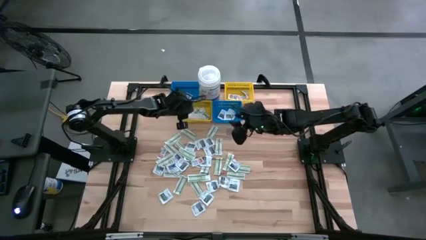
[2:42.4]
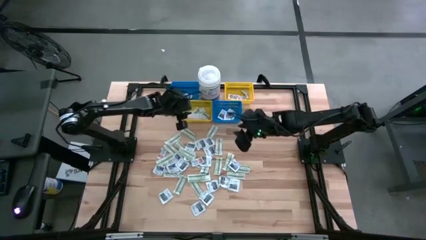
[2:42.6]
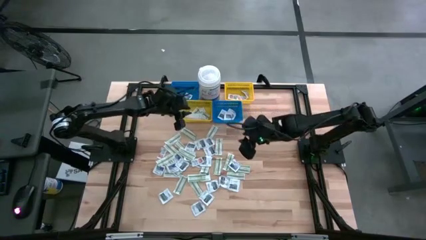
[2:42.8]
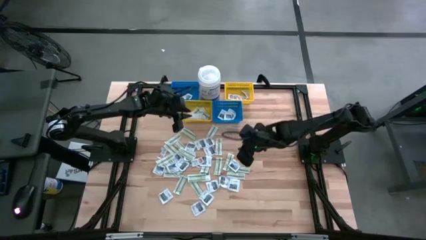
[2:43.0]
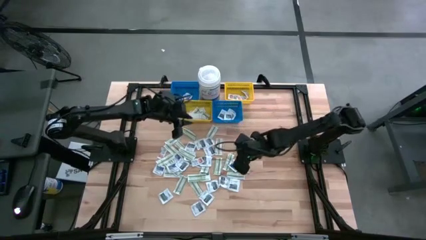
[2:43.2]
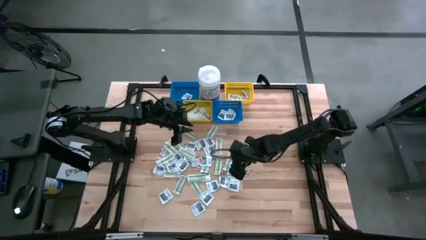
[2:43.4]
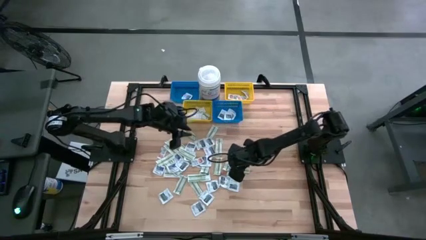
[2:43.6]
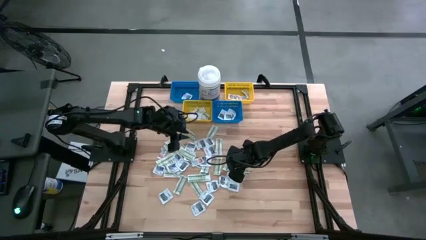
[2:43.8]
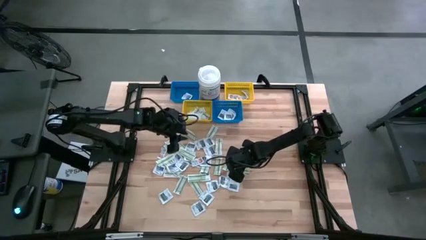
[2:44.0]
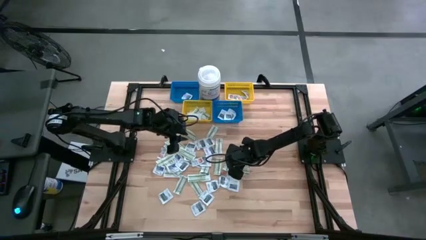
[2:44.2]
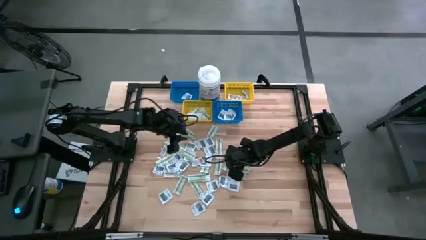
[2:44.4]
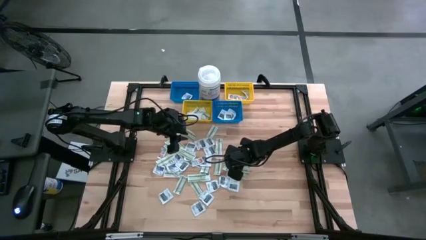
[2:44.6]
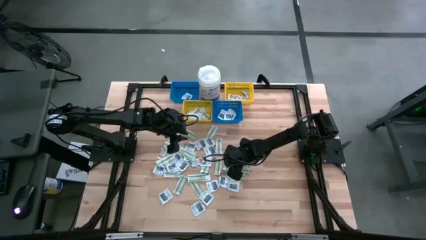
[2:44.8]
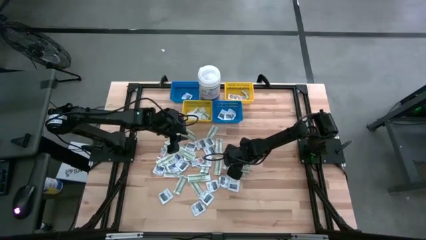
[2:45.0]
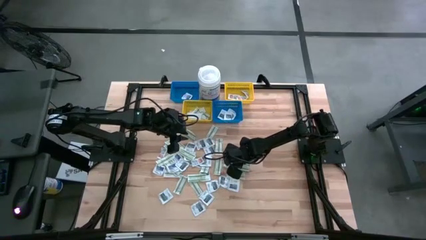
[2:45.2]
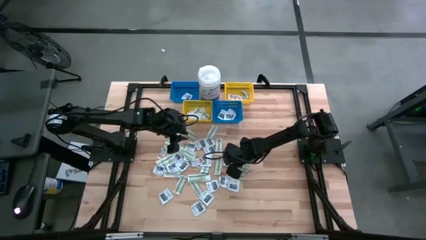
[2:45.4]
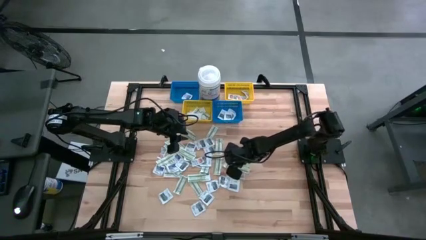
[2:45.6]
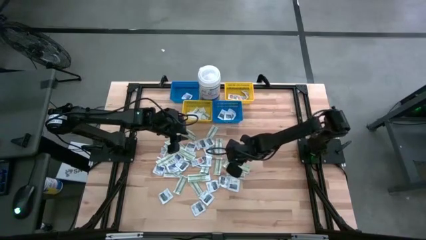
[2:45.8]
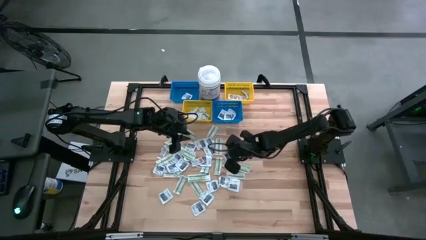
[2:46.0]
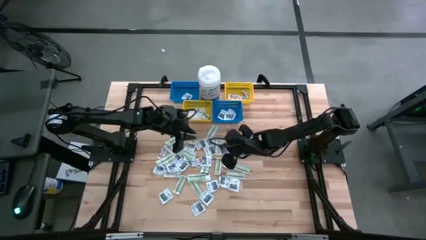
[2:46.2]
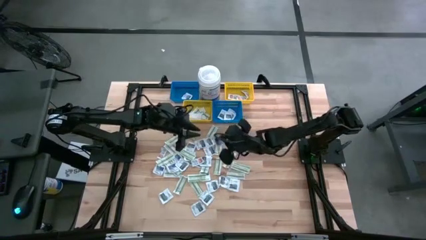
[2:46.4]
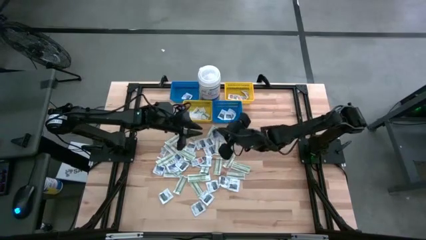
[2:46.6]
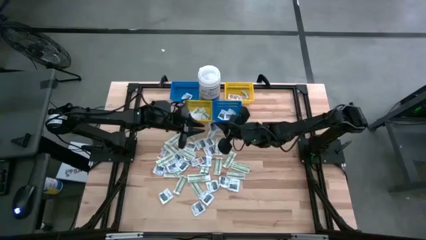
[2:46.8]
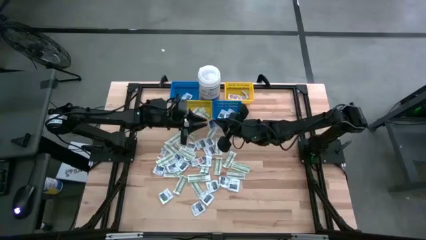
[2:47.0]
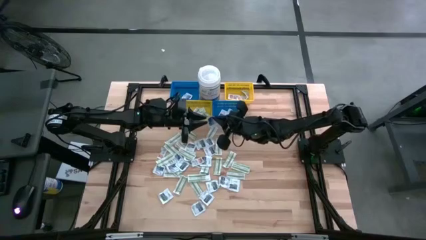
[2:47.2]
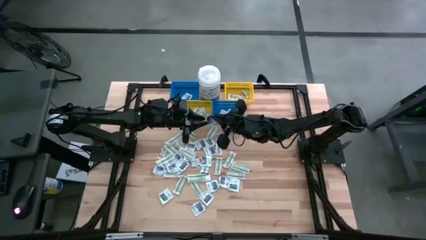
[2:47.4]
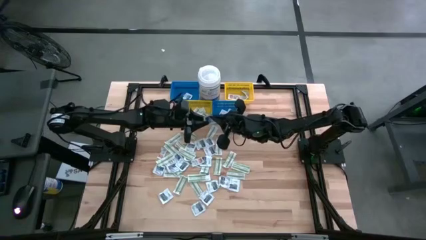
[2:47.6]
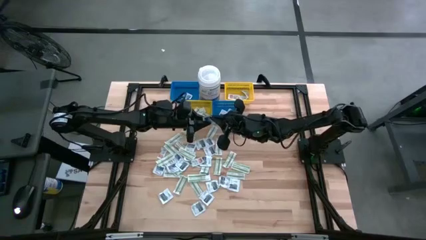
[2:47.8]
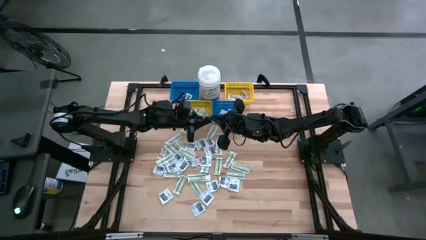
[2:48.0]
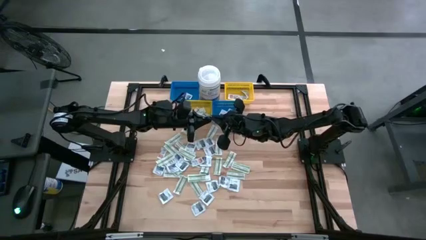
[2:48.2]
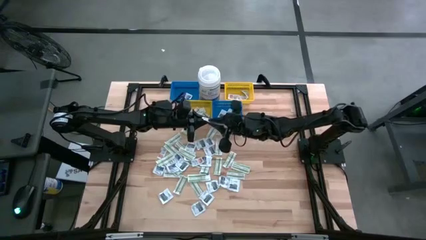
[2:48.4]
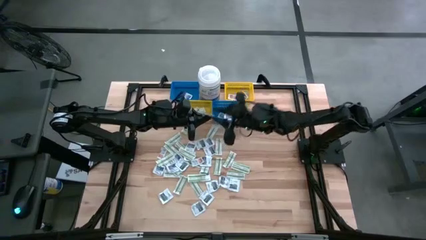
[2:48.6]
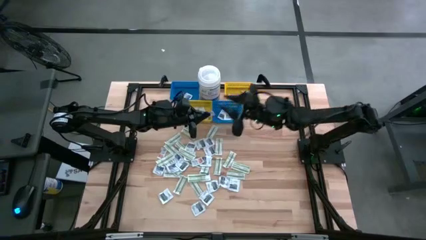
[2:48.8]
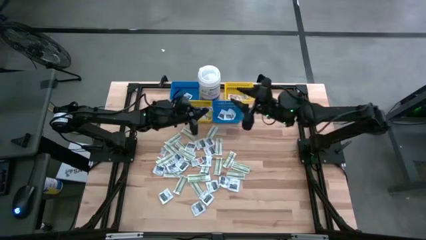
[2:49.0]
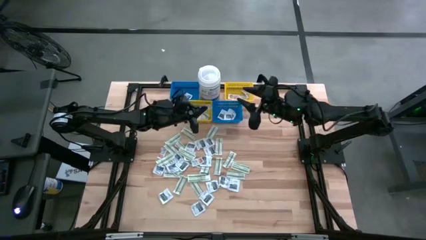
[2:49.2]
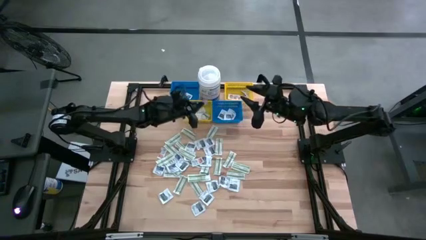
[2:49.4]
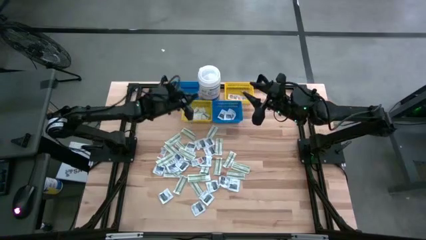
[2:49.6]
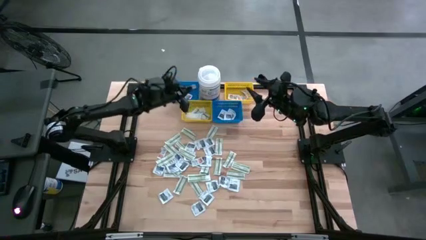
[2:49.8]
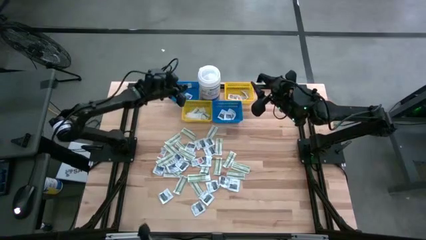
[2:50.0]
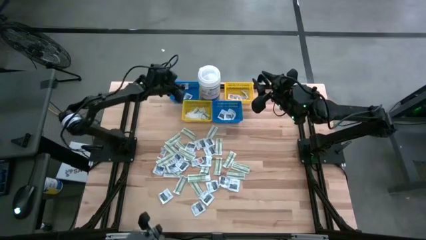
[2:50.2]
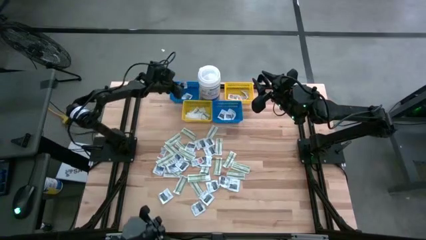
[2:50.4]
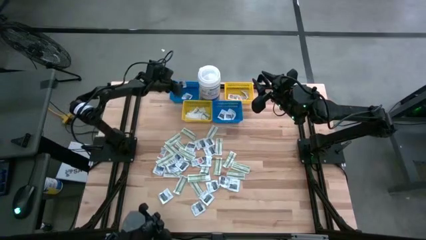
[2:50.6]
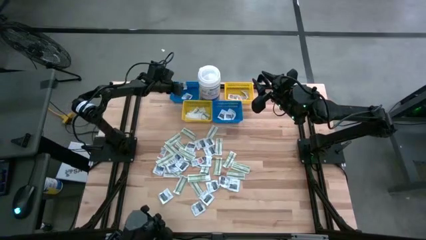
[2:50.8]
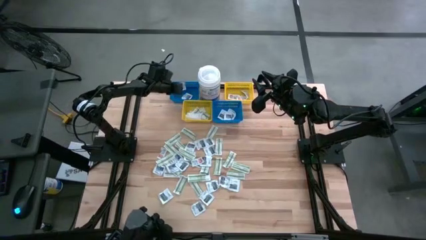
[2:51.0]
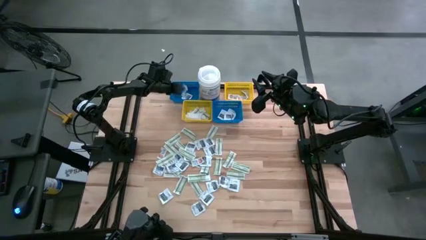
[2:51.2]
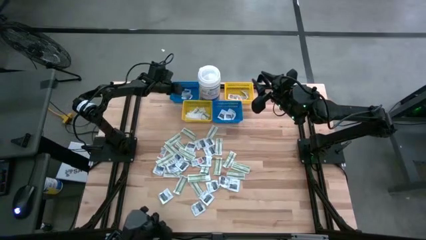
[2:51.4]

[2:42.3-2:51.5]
Task: Pick & Place First Aid Supplies
Put the blue alcohol pad into the left blue bin

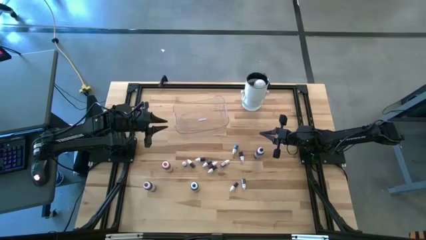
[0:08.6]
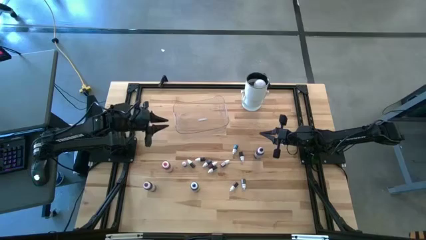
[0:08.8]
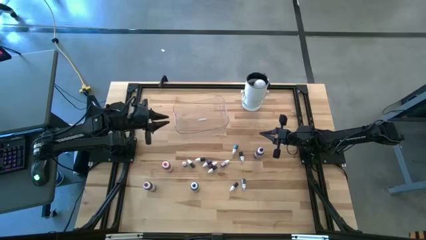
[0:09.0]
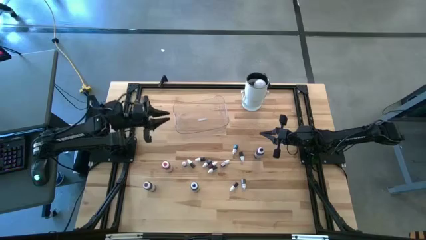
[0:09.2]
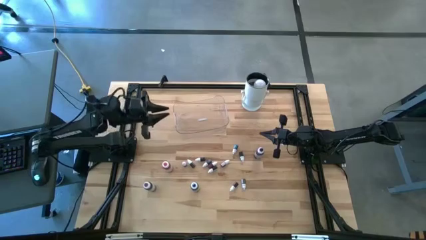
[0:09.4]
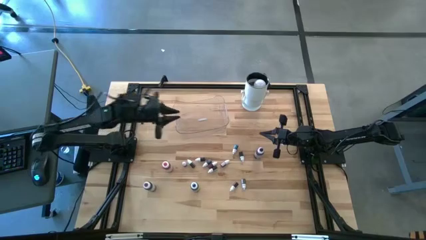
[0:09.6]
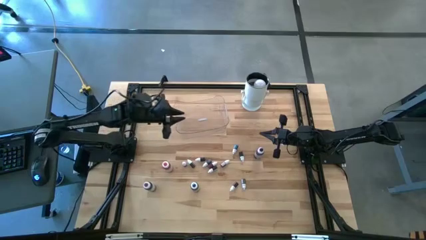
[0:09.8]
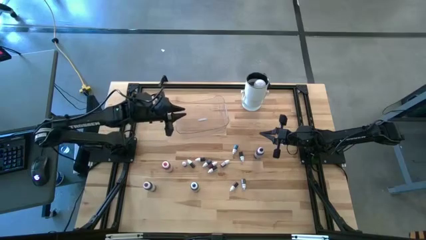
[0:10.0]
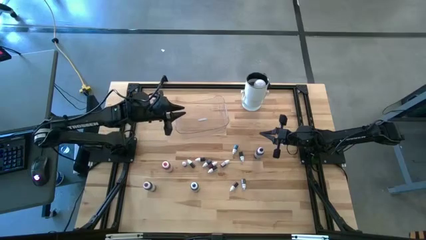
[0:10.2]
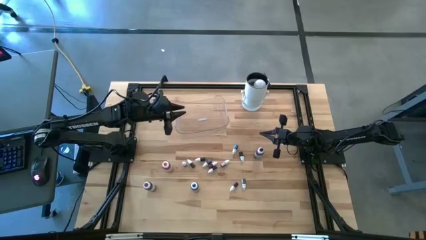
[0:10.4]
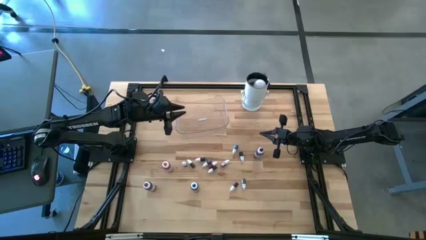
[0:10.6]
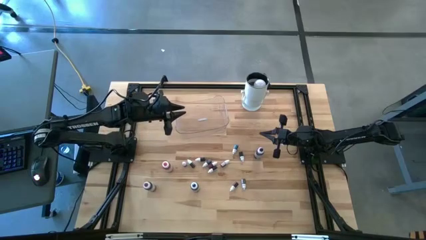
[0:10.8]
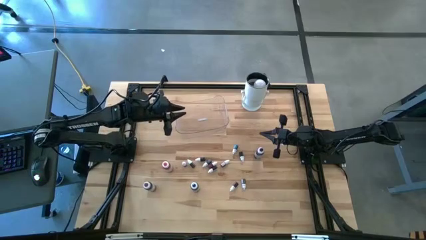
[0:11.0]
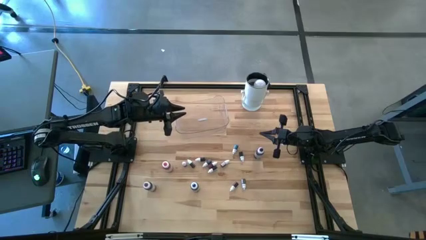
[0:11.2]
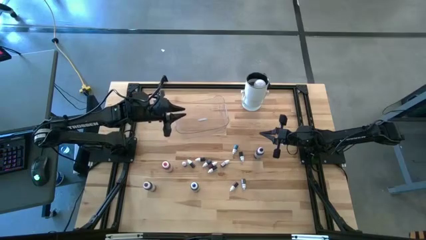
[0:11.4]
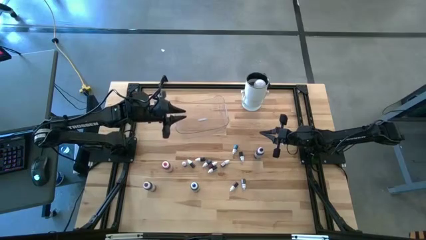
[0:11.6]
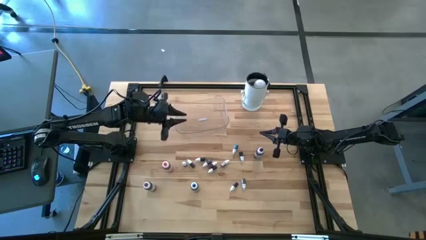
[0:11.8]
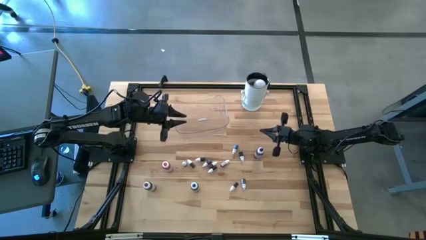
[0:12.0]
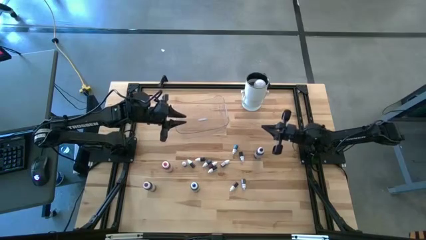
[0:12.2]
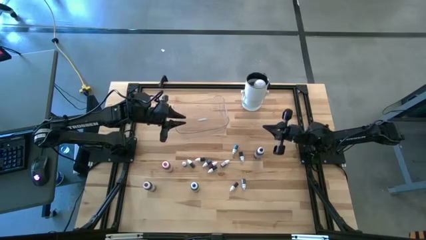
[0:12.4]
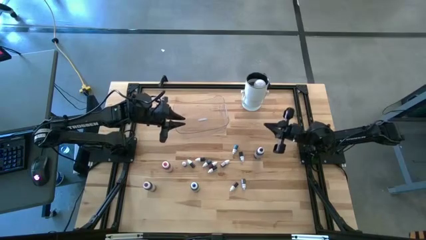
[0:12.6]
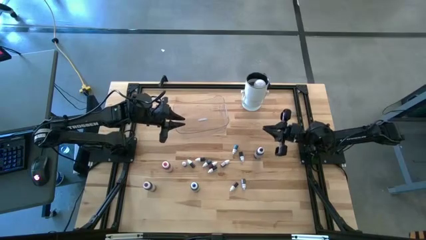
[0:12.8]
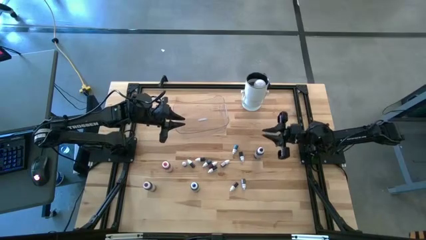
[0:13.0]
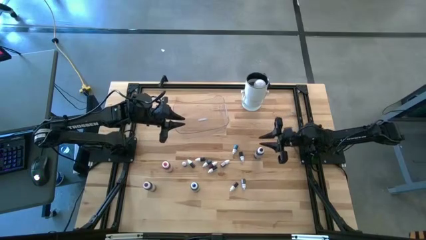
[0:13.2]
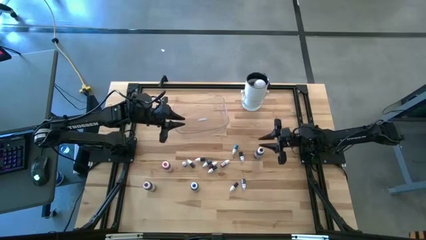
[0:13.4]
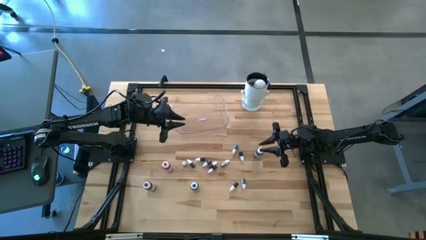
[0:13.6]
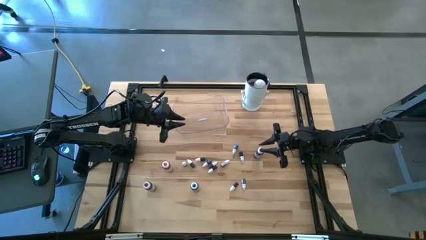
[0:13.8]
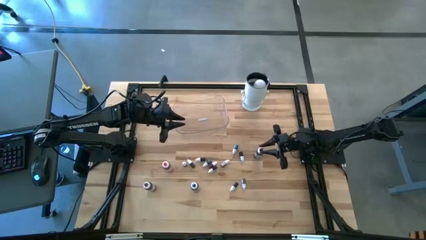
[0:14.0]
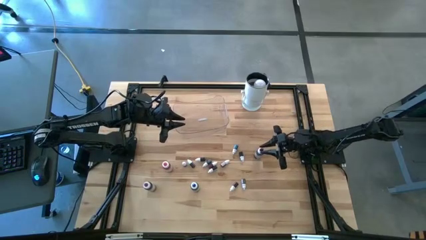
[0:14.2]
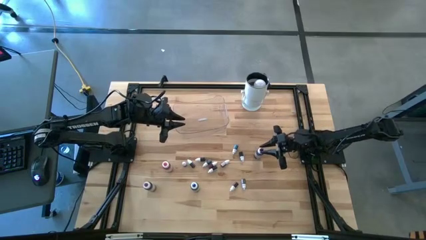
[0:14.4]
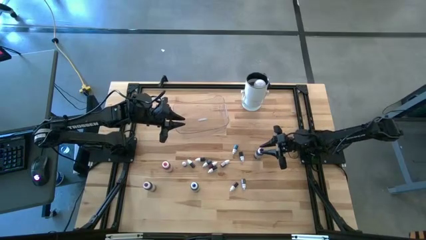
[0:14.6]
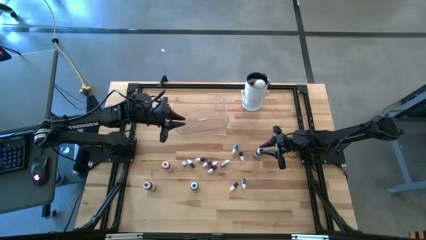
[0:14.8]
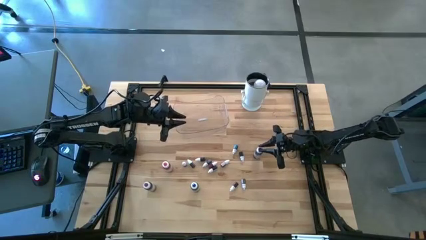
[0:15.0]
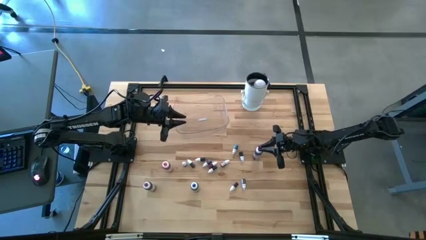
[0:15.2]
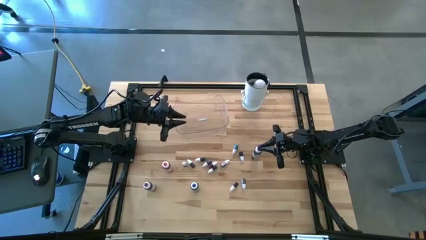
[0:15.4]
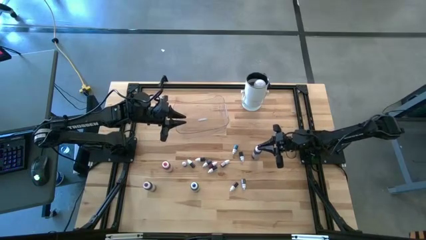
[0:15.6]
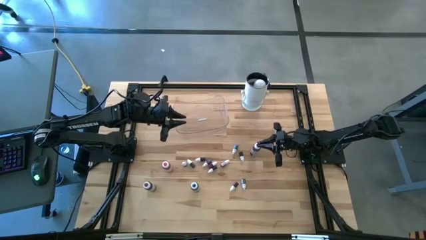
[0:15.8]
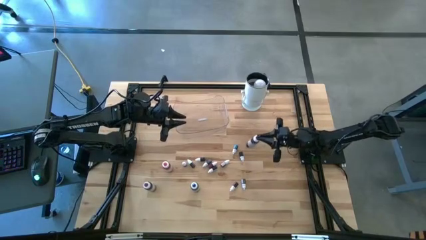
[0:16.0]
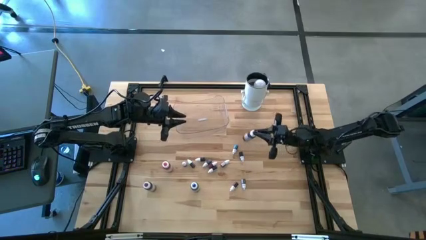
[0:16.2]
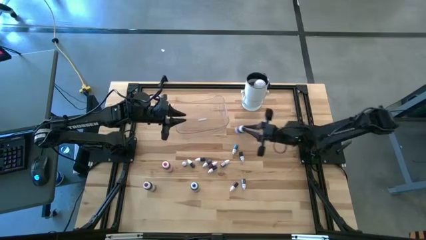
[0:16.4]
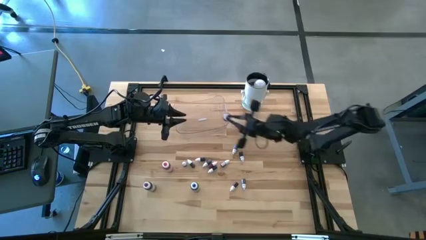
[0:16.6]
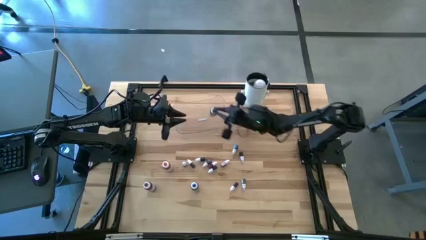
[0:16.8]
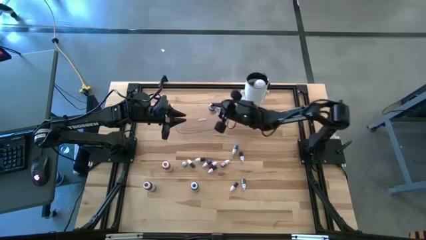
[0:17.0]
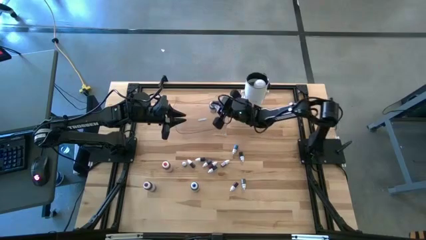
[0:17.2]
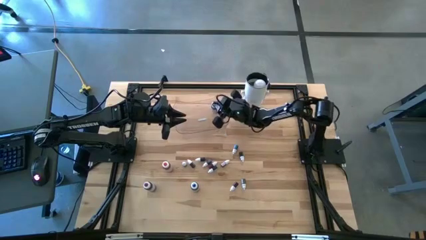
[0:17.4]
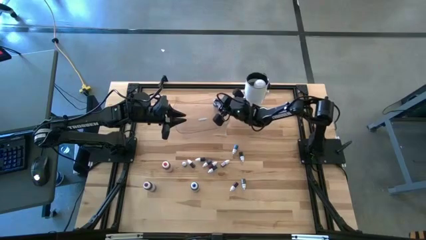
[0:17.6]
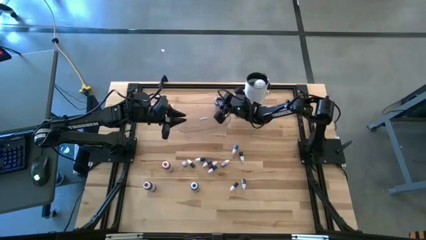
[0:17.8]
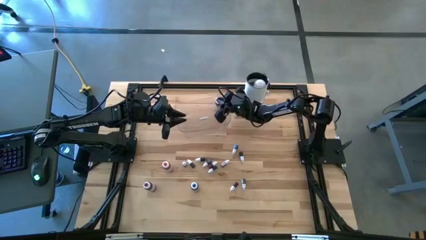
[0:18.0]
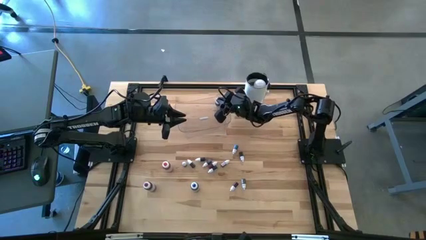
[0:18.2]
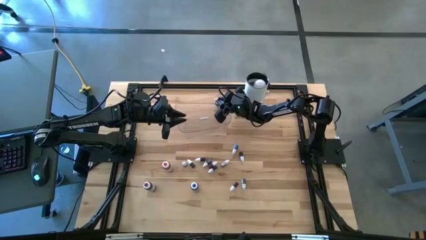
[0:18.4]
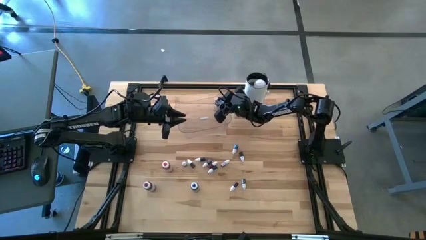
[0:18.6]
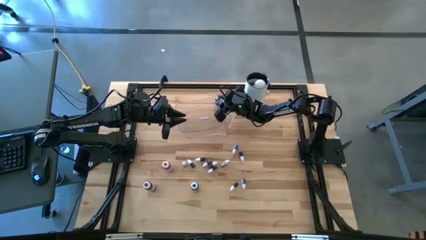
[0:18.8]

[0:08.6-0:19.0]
Task: Pick & Place food coloring
Put the large black food coloring bottle into the transparent container
